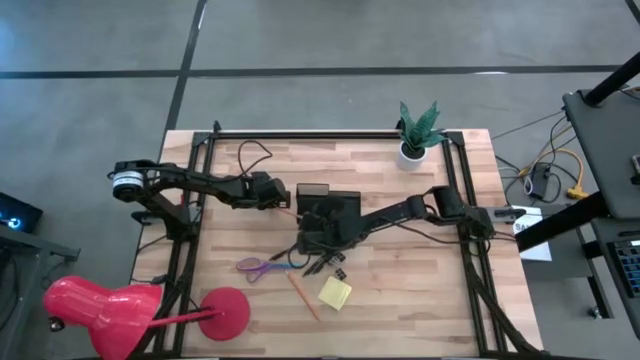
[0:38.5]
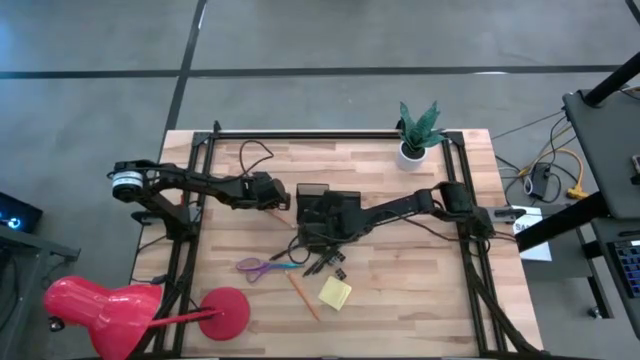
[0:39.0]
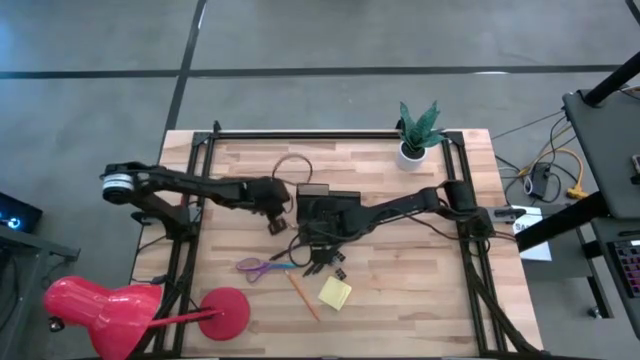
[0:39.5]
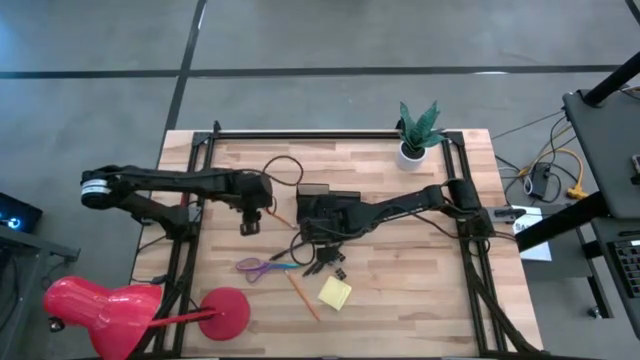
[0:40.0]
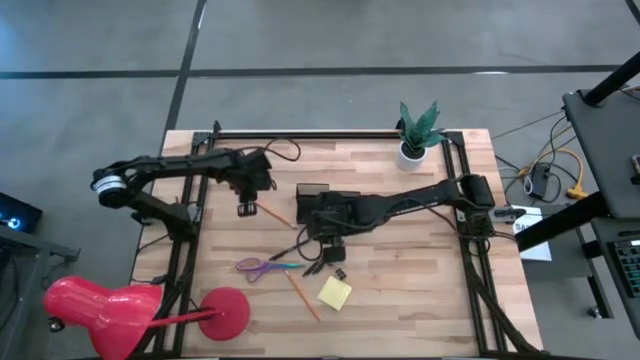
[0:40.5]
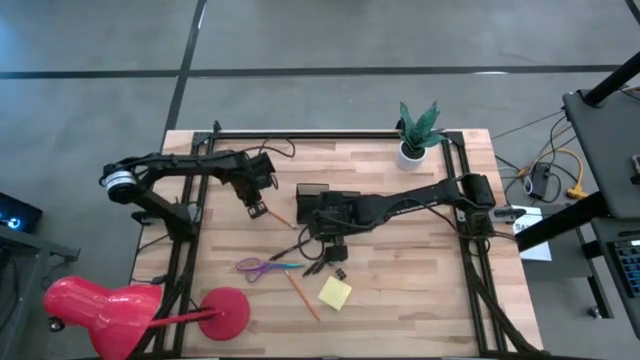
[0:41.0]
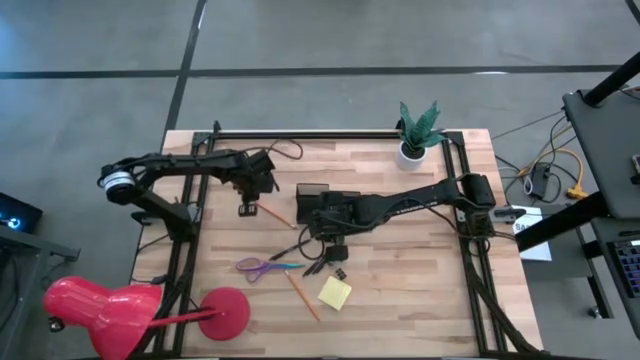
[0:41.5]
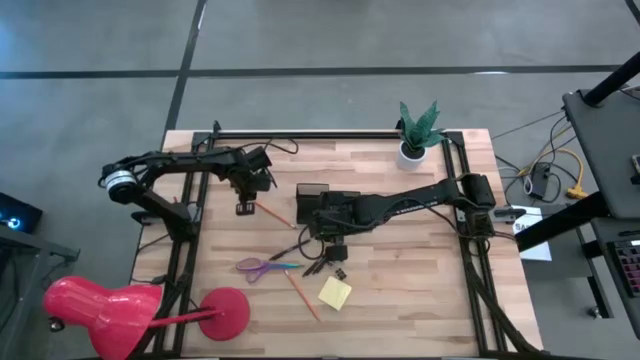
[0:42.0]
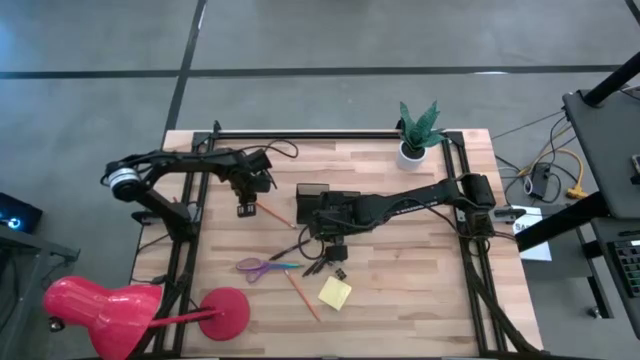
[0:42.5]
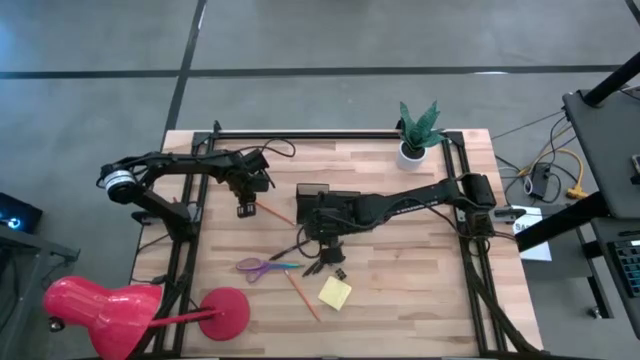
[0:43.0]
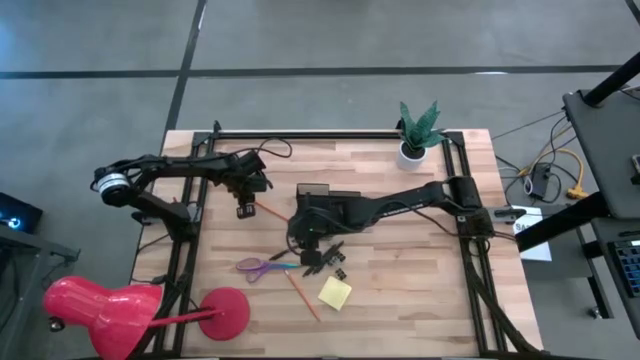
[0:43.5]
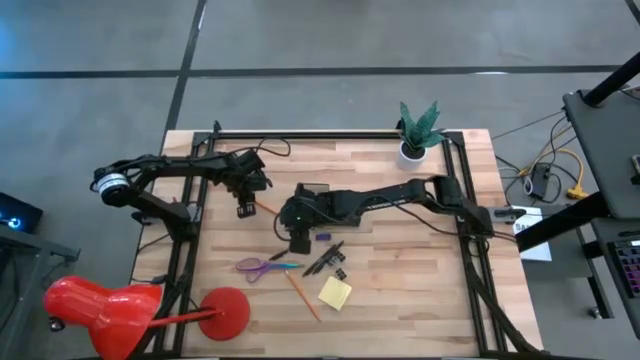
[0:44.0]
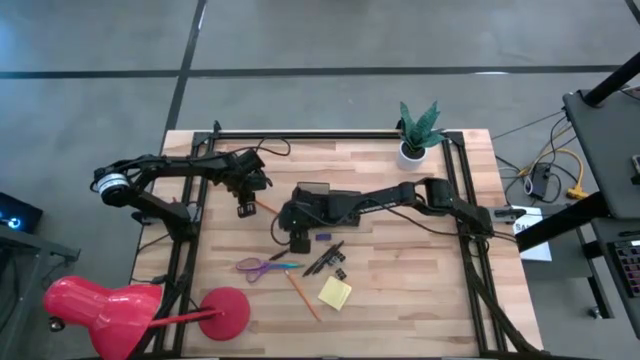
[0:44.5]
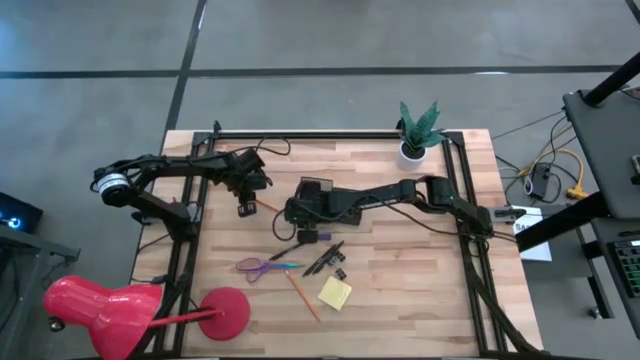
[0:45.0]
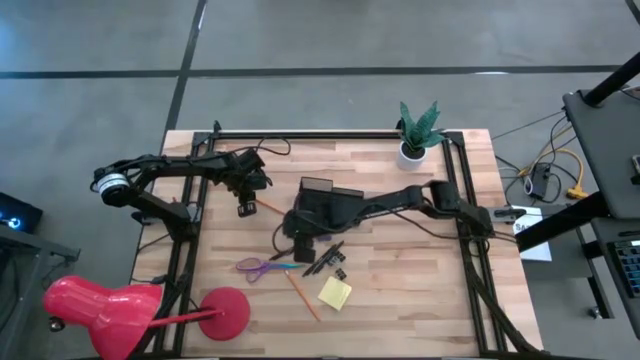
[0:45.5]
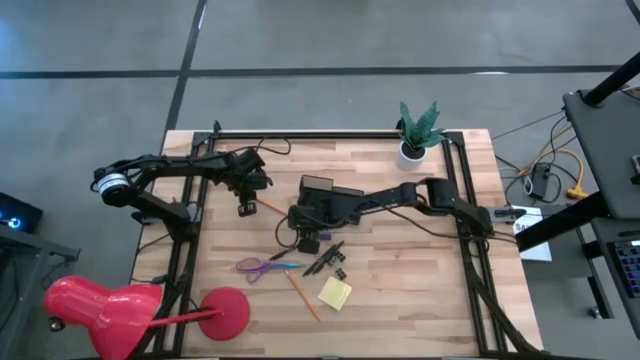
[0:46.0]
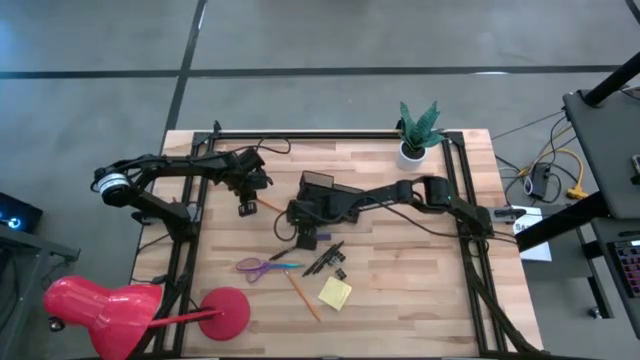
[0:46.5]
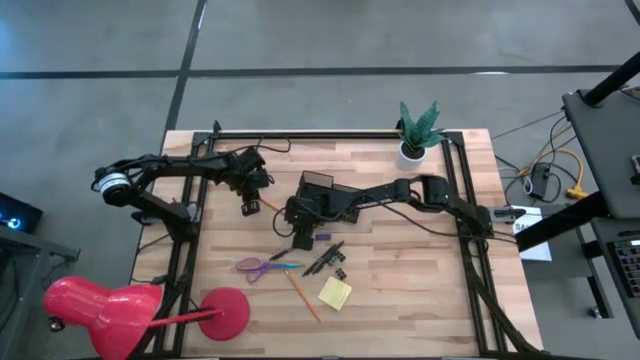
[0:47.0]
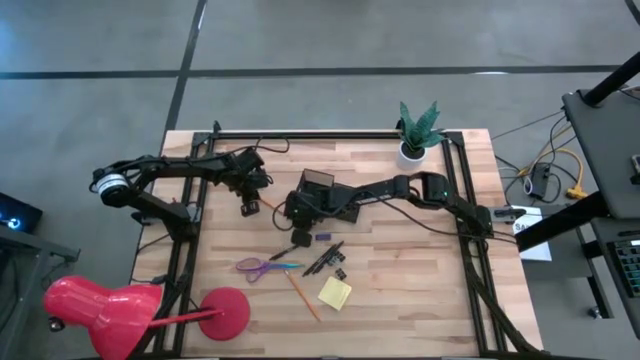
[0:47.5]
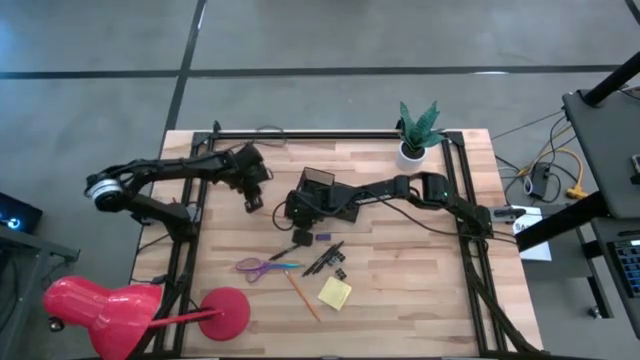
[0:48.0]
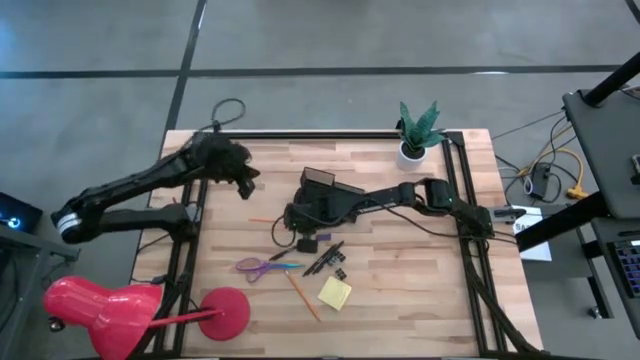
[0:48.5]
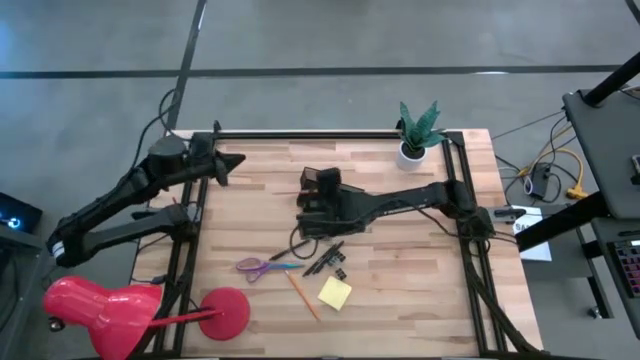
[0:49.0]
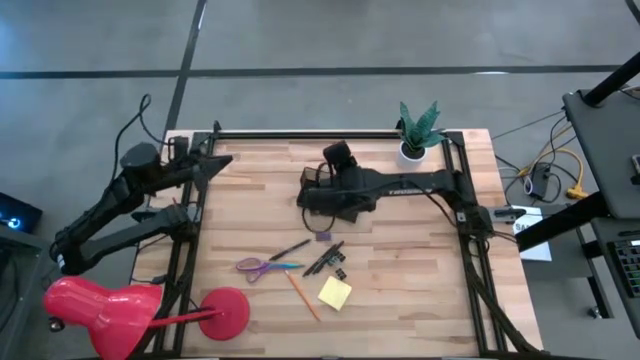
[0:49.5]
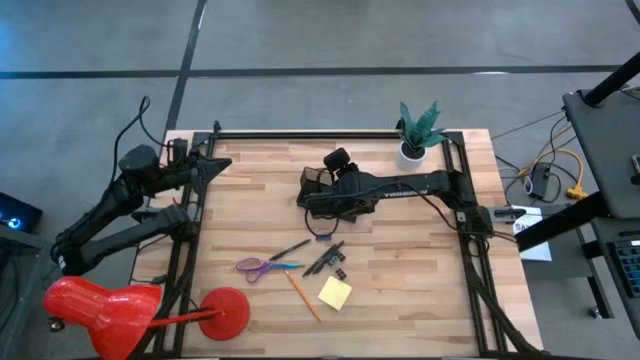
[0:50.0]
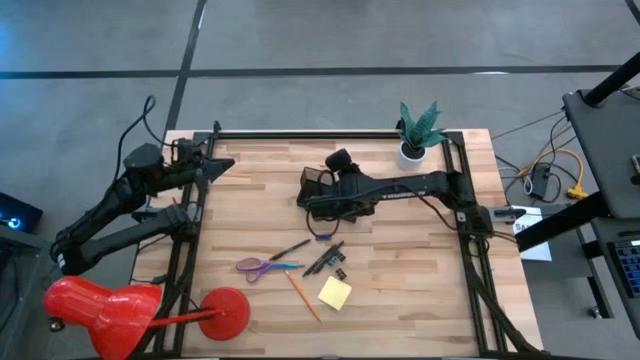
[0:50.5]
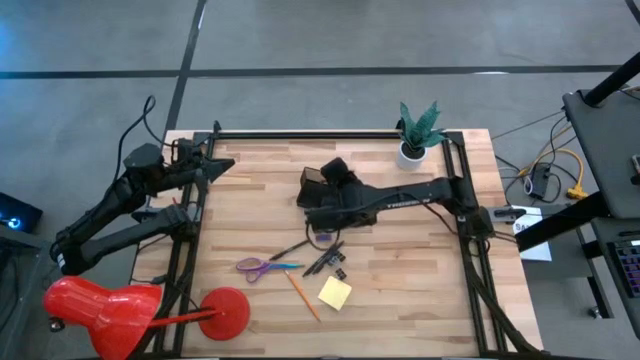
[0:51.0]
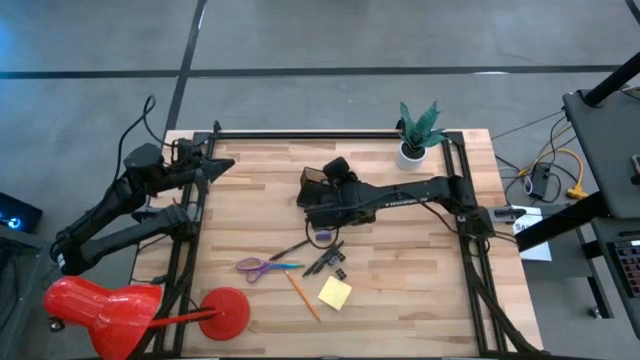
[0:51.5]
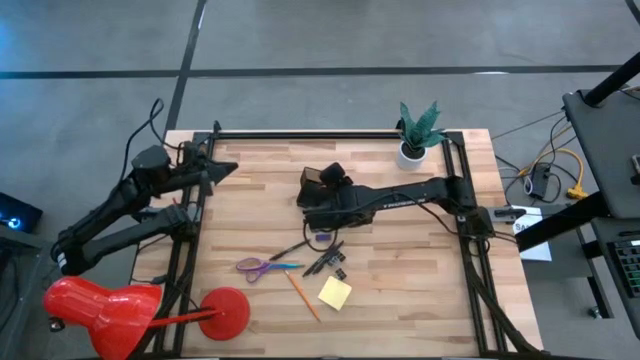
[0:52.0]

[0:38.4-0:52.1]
Task: Pick and place office supplies into organizer
Put the top pencil into the desk organizer

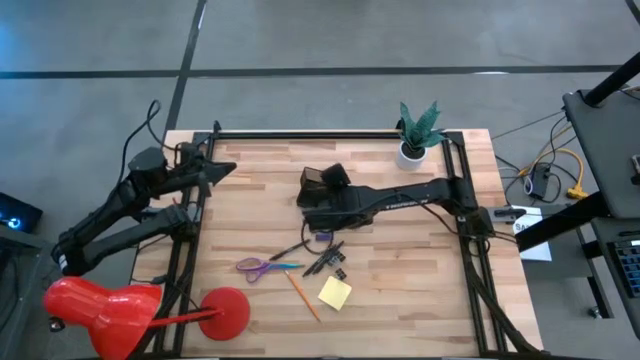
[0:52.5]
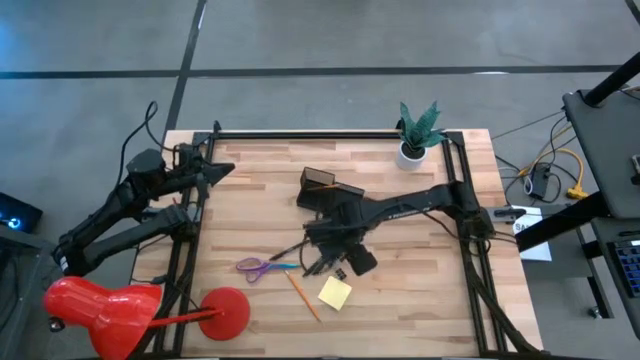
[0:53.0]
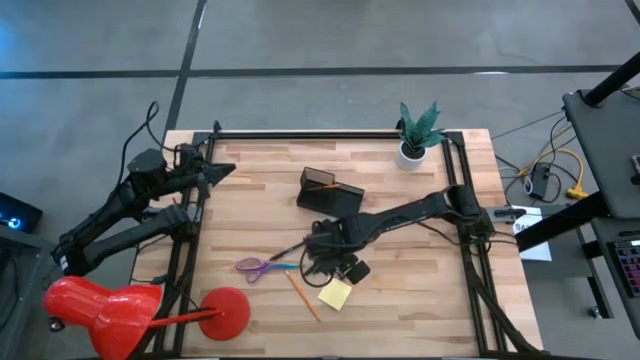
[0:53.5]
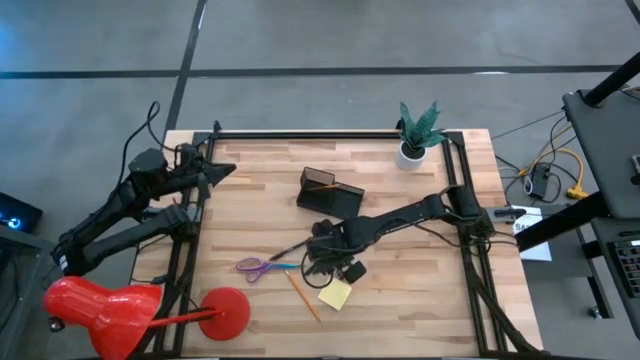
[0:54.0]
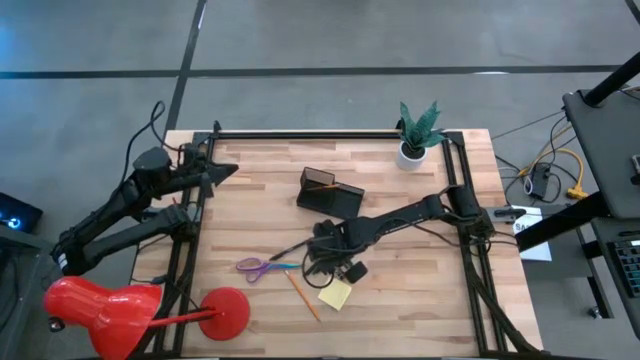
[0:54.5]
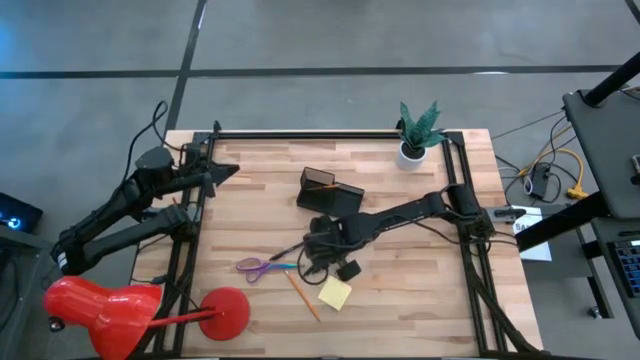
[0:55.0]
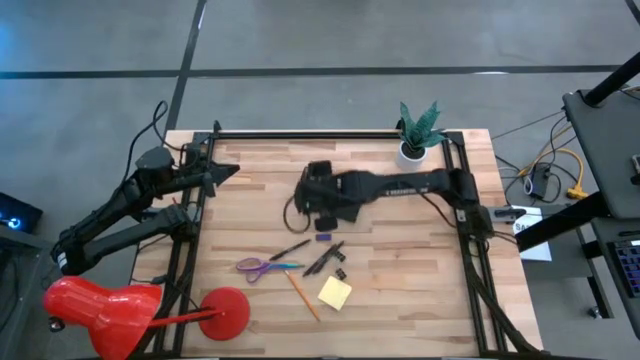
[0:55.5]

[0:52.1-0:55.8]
Put the middle binder clip into the desk organizer

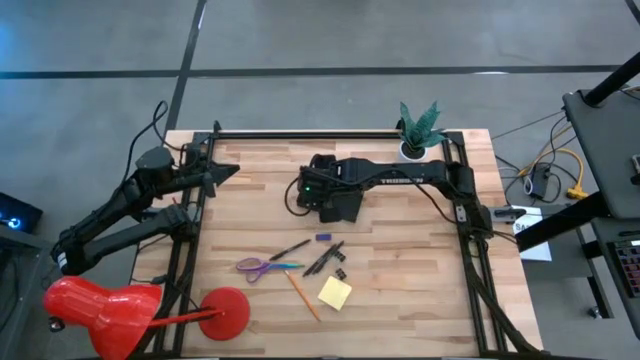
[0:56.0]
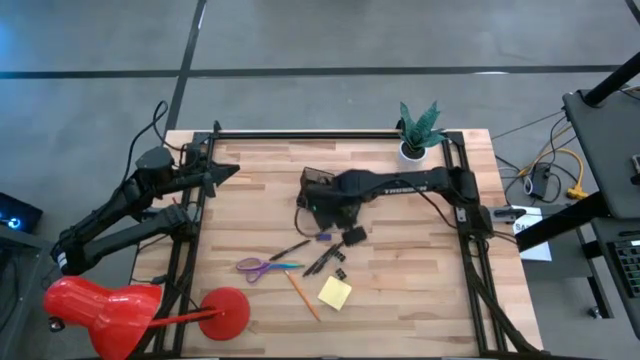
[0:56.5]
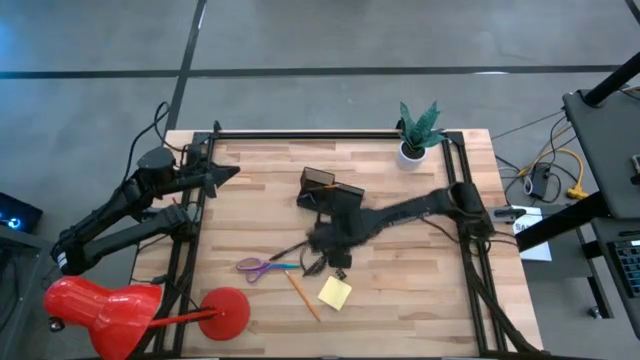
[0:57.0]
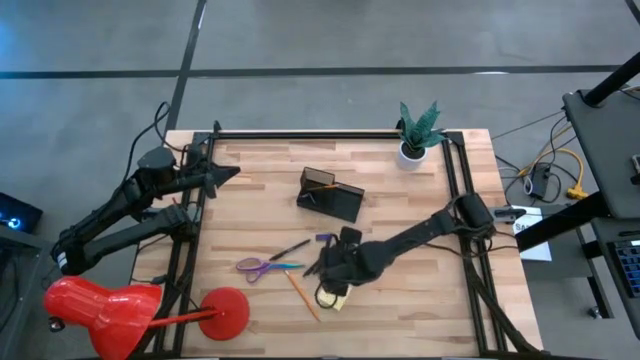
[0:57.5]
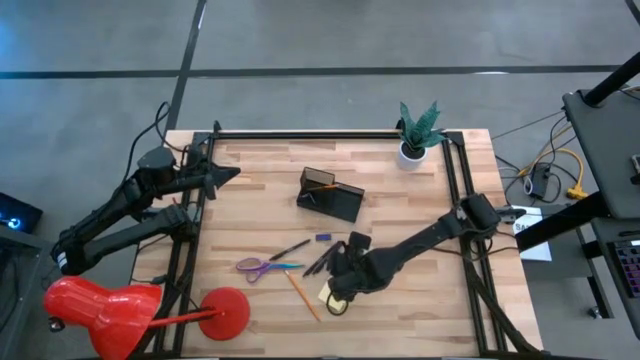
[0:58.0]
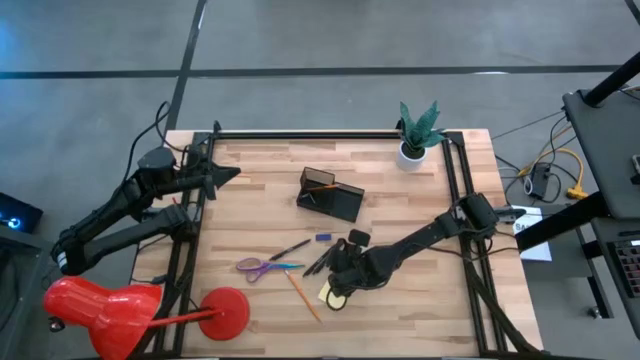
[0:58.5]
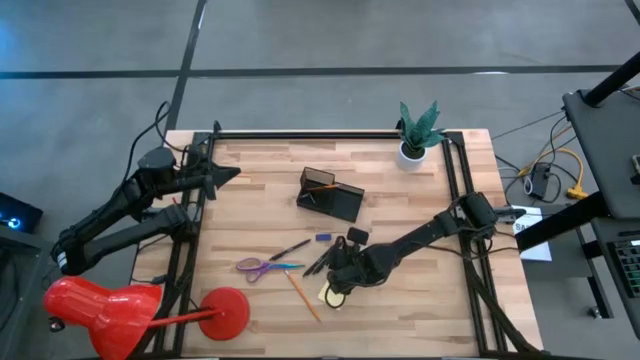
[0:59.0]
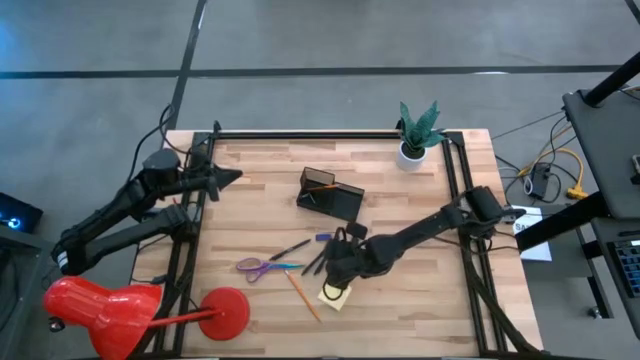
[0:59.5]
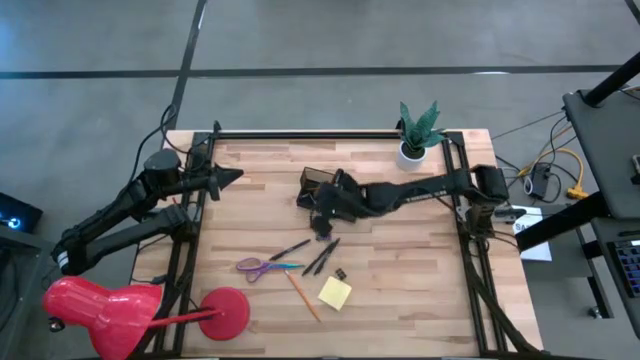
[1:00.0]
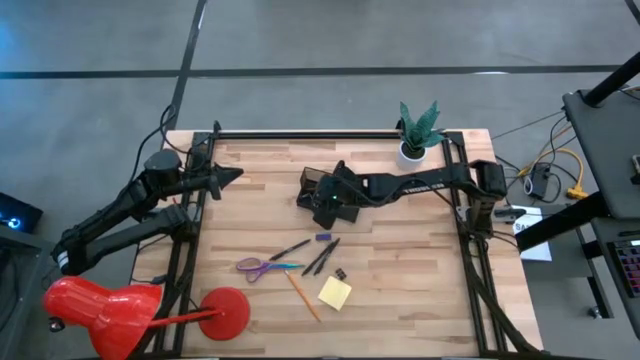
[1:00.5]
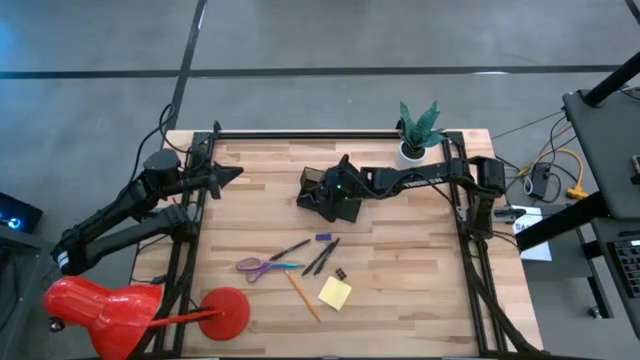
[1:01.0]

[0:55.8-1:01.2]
Put the top binder clip into the desk organizer
